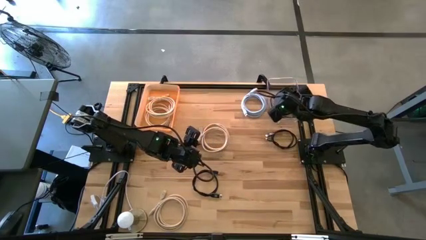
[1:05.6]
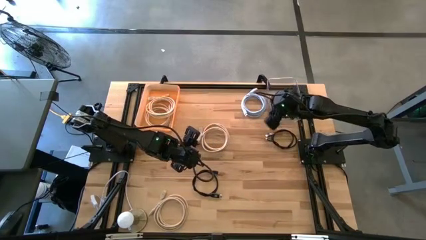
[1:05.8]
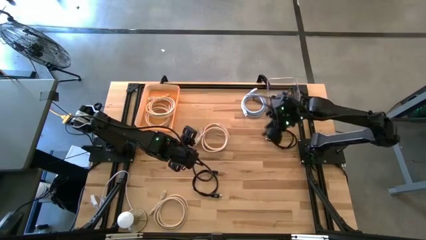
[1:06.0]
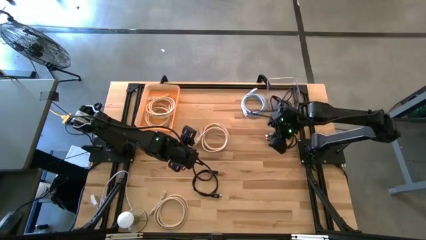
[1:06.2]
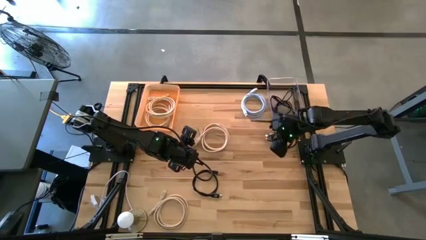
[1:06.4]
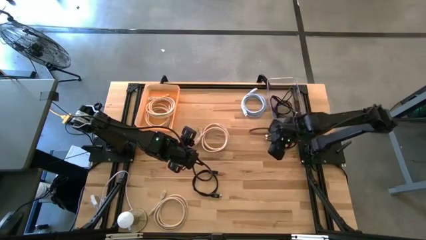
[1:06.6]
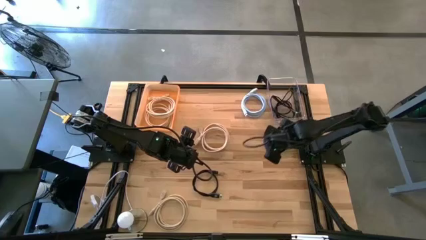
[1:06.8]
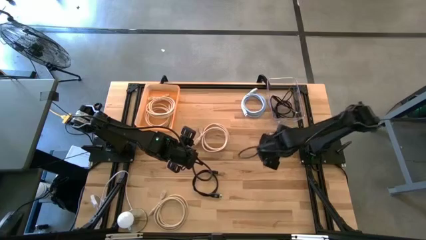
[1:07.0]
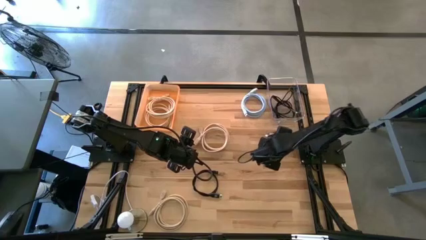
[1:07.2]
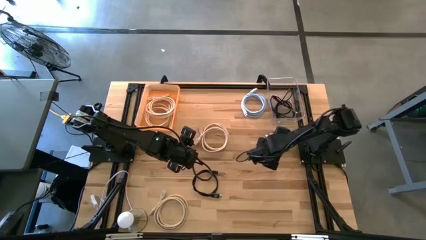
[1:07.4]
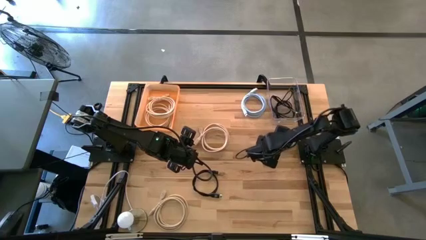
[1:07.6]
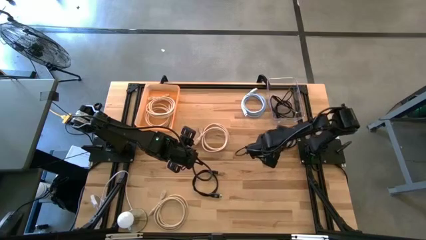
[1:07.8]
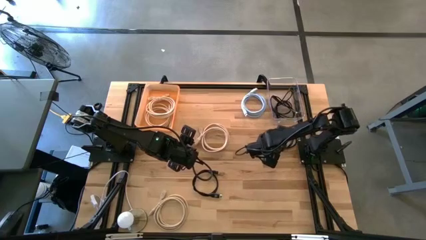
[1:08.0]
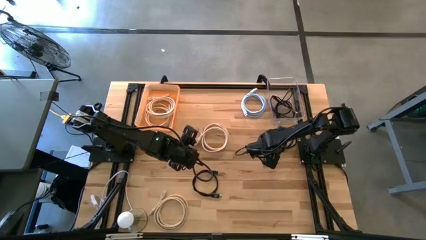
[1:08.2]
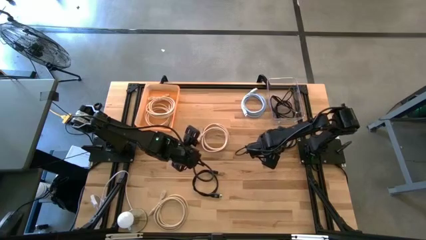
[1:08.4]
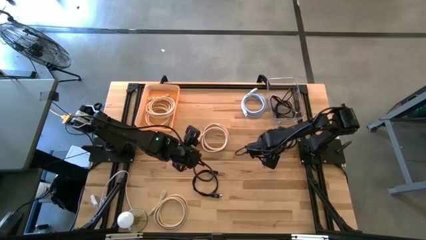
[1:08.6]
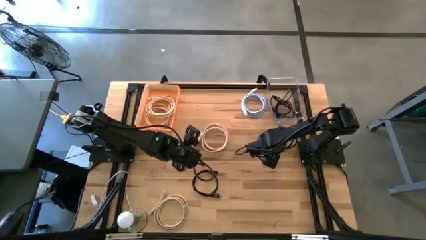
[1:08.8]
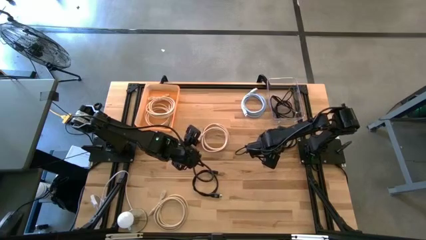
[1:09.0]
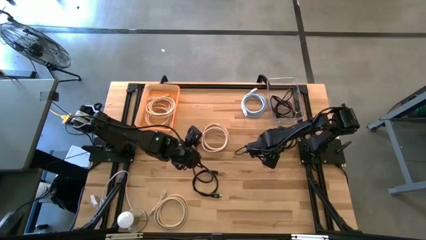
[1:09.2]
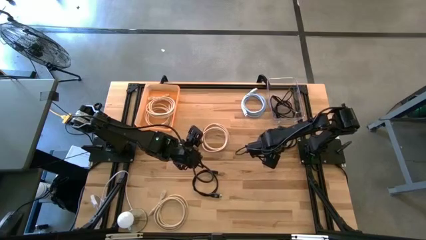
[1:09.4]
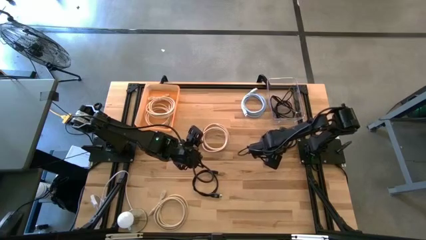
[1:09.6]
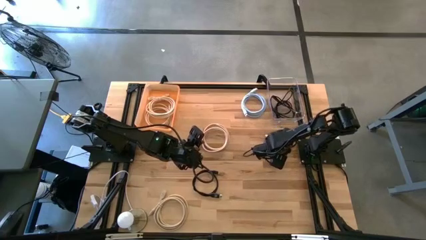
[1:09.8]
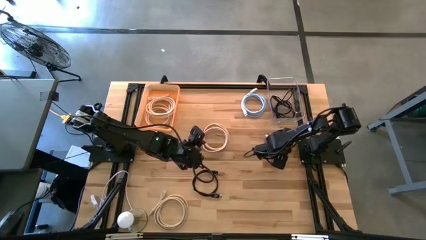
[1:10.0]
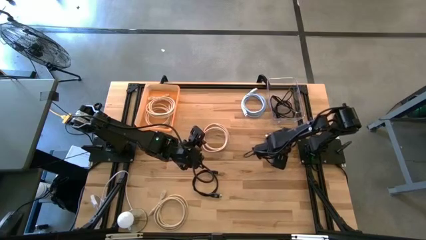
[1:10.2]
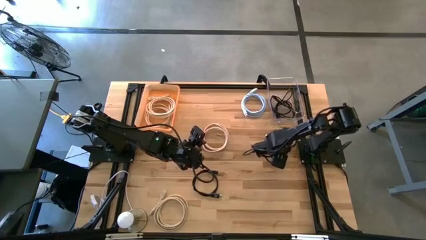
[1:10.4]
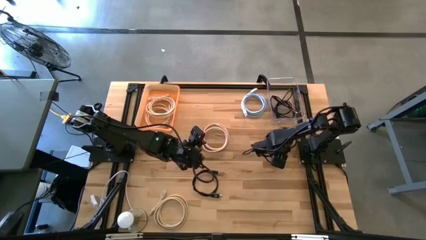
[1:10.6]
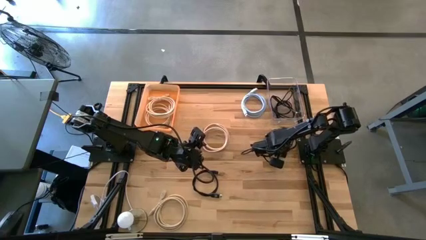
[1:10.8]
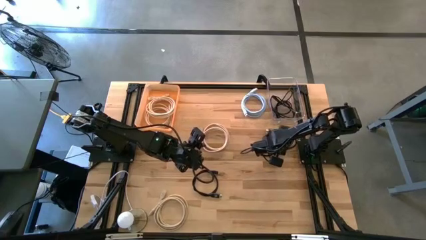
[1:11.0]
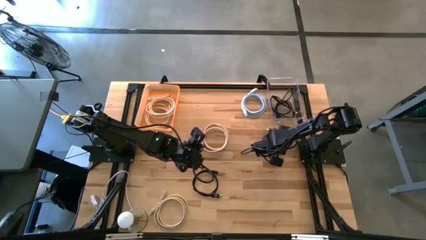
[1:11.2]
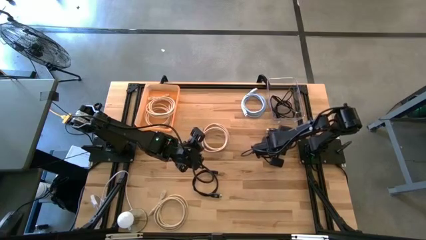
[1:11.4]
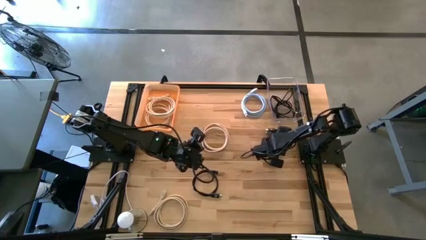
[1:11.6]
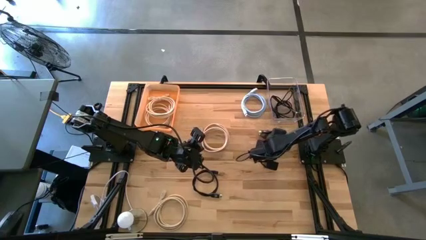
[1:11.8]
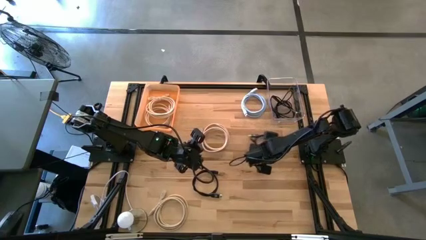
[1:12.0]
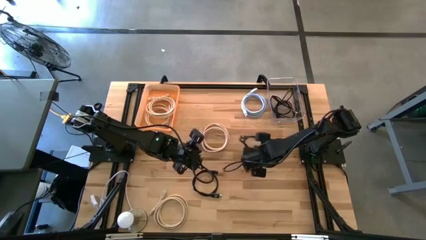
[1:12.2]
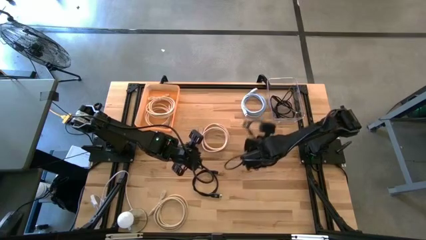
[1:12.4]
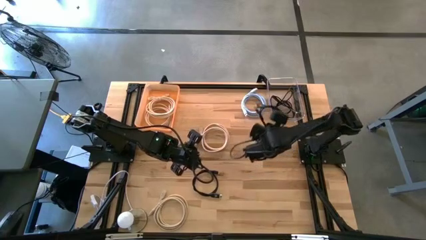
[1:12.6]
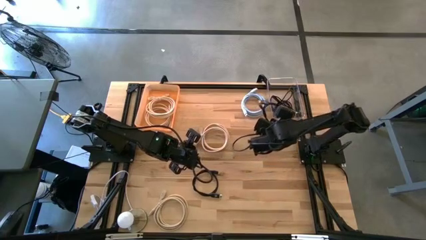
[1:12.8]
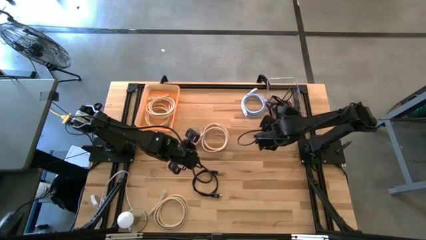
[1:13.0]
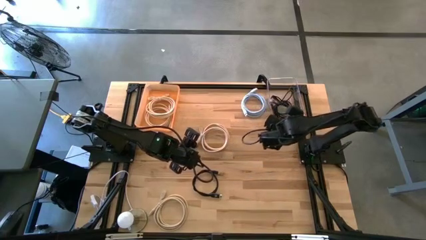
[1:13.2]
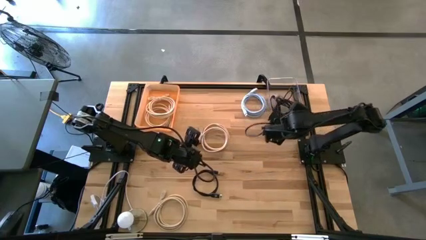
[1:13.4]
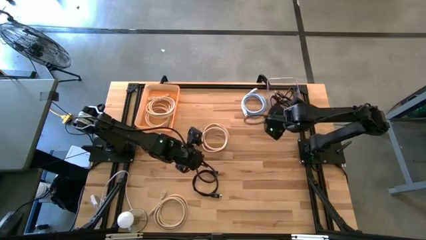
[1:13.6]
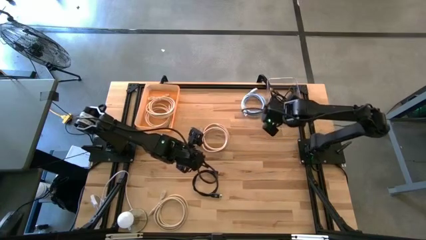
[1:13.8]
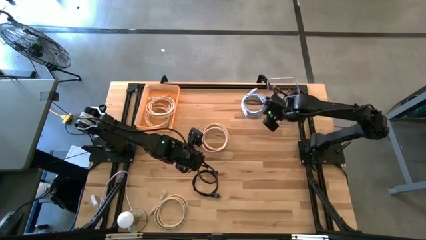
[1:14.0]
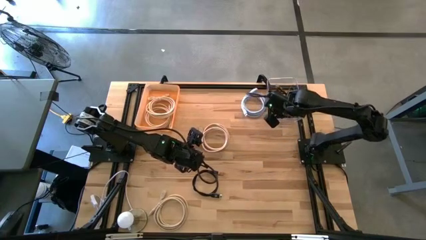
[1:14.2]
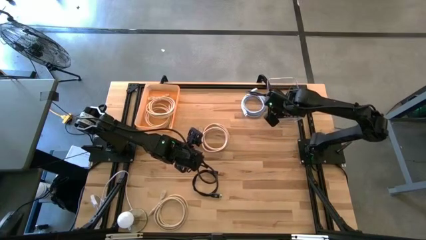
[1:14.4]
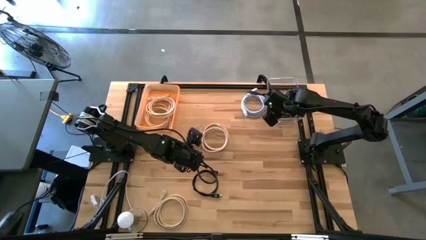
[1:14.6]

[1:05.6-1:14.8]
Task: Sort HDMI cables
Put the black HDMI cable into the transparent bin

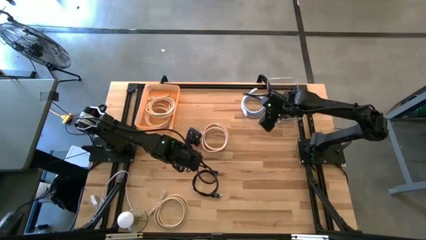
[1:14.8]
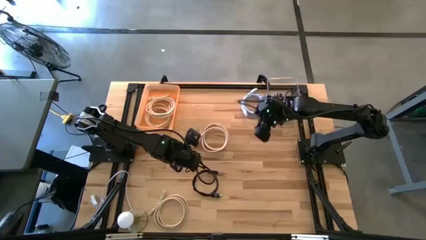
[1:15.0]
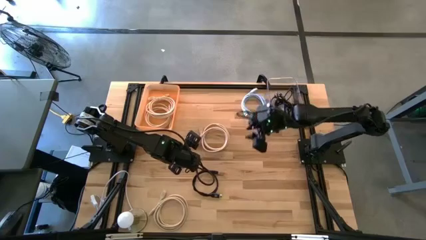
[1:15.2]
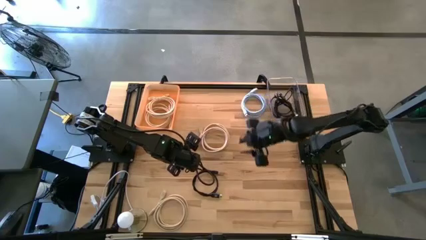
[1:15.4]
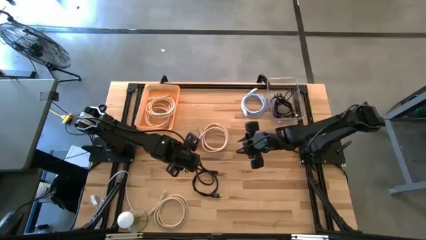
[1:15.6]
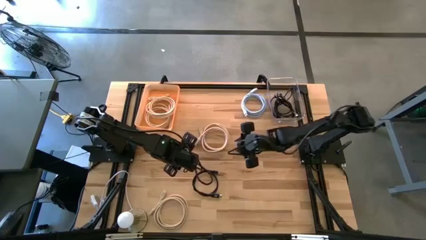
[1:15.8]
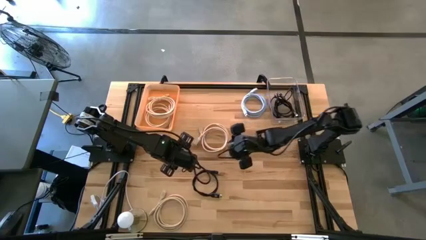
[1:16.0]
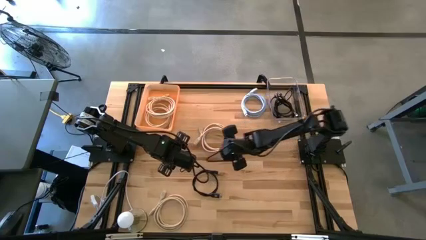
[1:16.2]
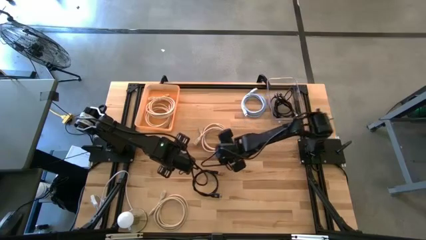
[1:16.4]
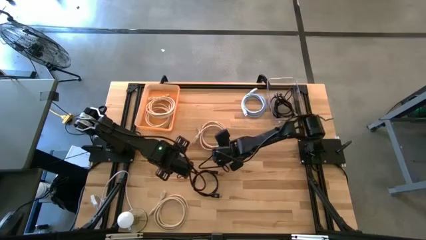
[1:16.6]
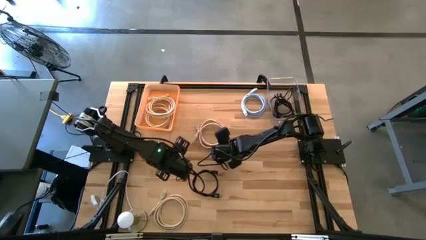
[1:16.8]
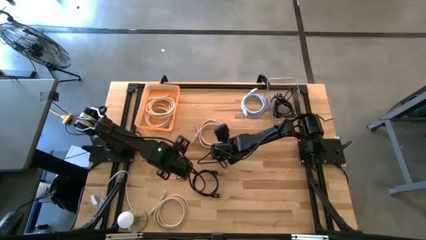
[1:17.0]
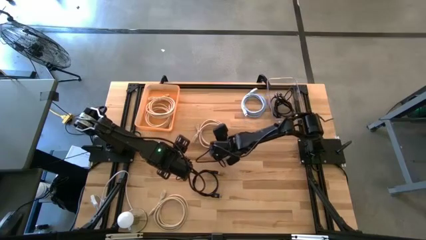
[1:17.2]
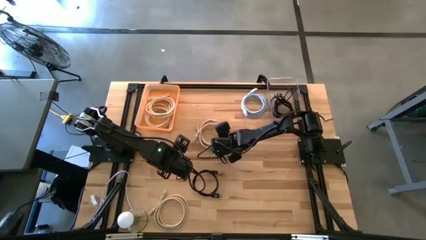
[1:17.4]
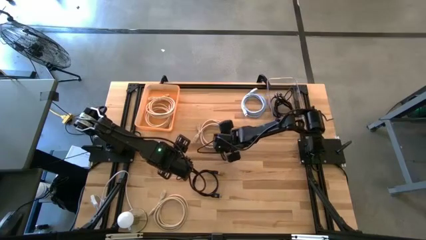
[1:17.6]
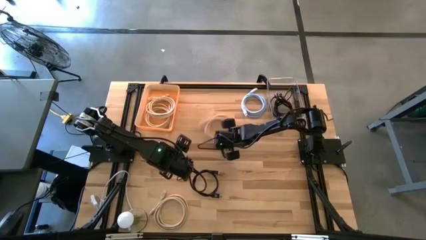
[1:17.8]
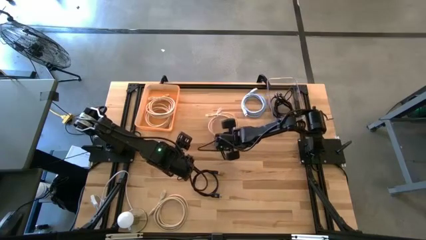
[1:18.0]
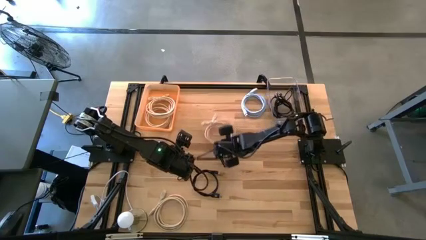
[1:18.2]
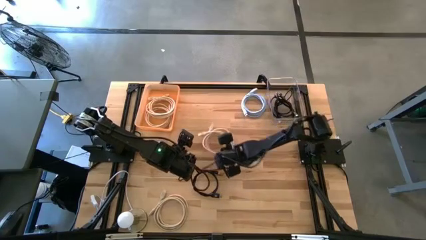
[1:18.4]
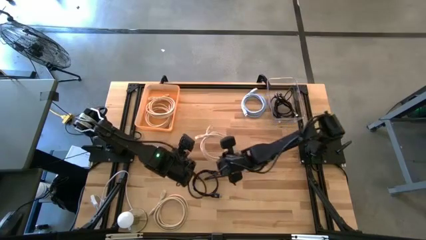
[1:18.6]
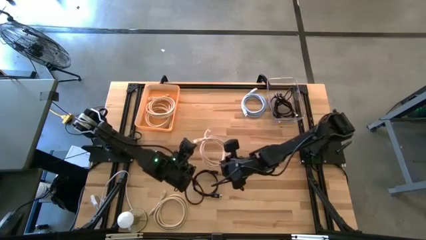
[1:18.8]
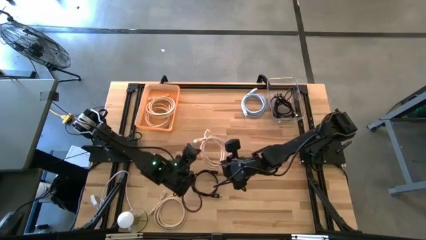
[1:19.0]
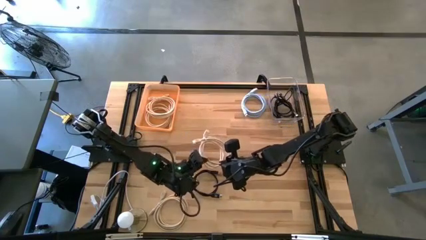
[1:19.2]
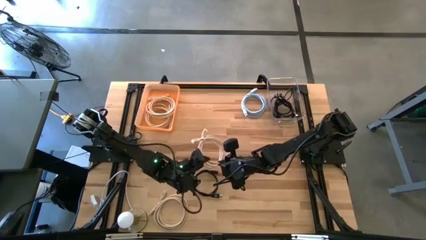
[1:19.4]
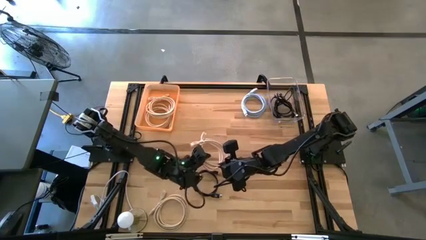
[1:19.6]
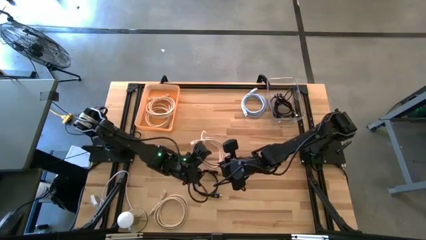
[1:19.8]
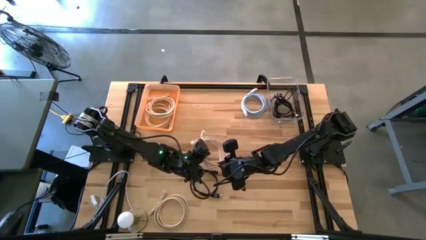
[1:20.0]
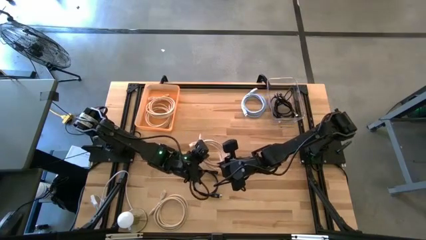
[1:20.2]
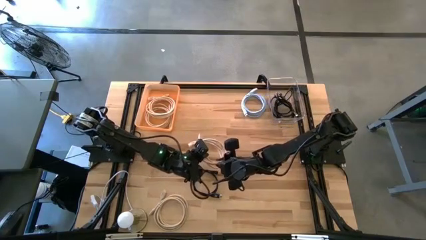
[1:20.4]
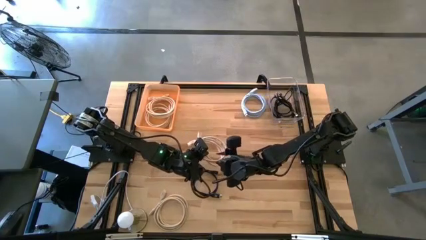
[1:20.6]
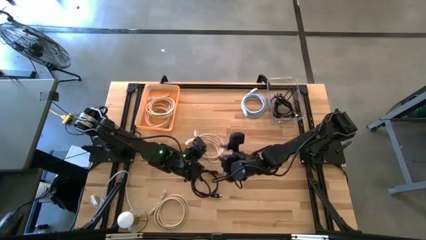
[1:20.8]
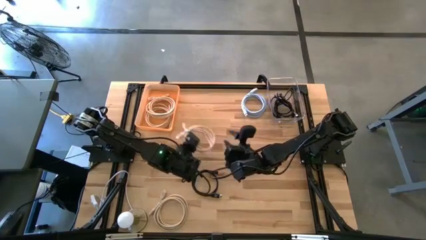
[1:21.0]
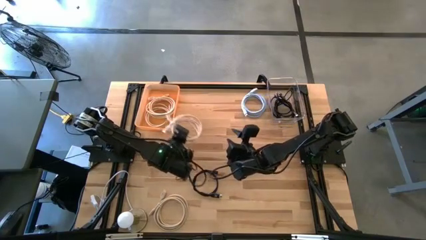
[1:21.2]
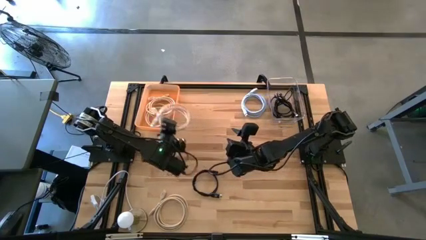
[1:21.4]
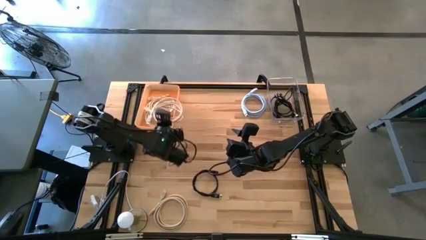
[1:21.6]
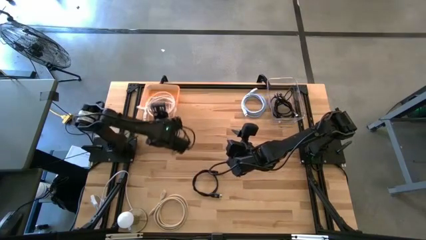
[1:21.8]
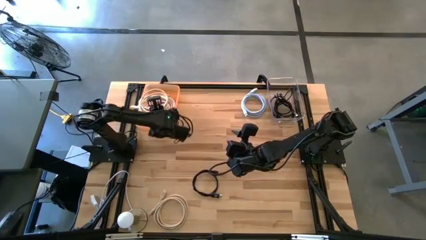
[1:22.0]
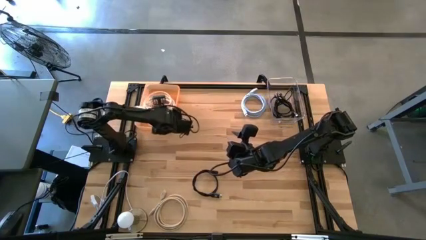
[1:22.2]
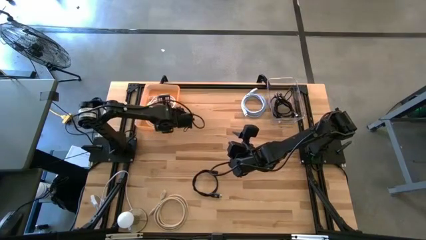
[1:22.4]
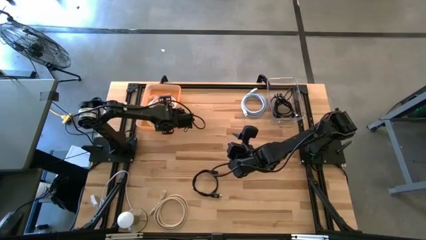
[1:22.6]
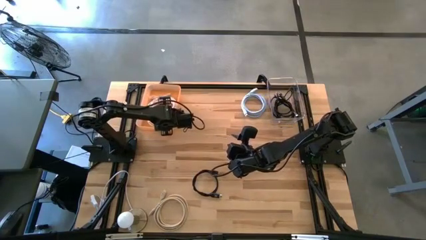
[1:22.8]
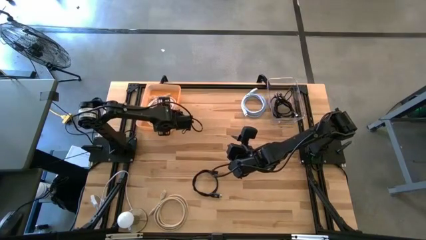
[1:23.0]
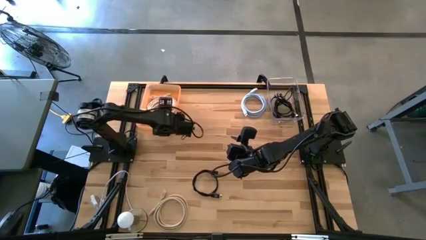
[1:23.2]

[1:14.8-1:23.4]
Put the brown HDMI cable into the orange bin
